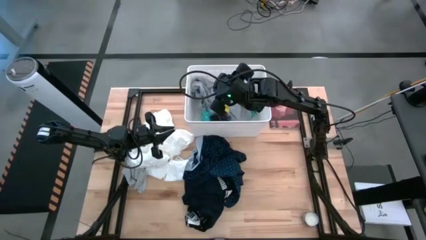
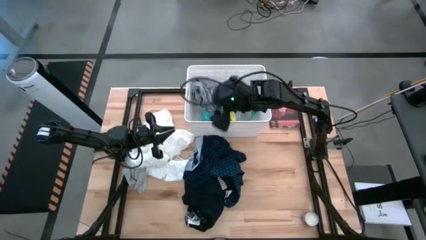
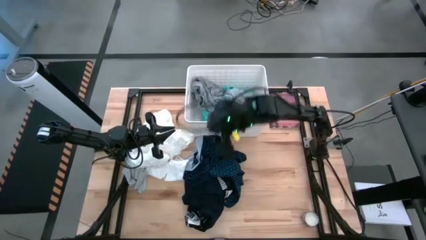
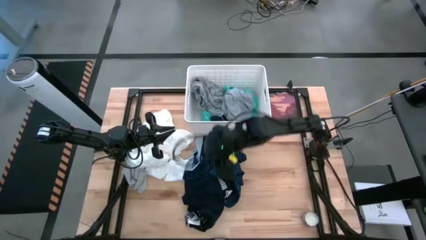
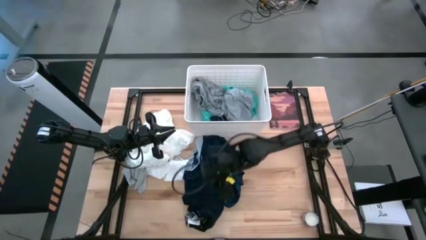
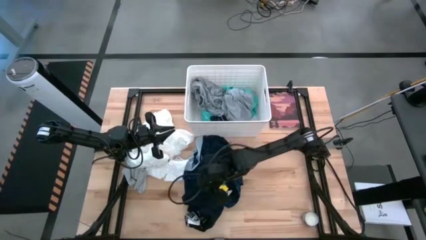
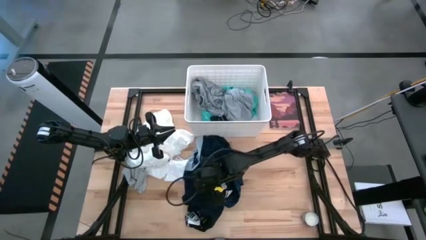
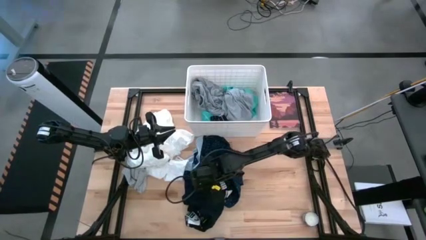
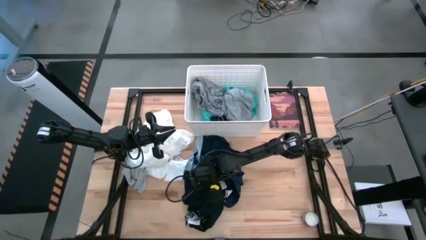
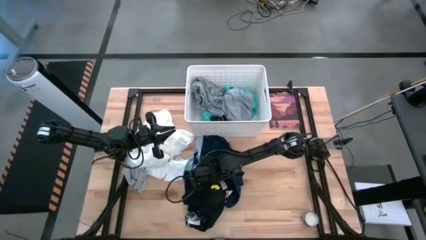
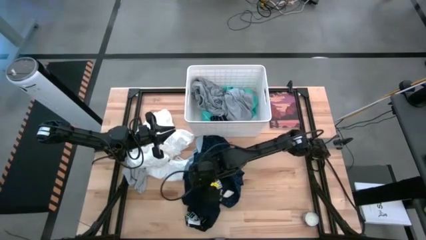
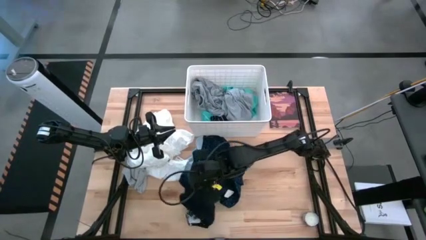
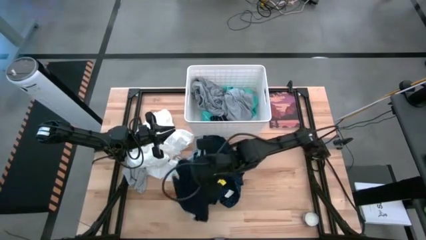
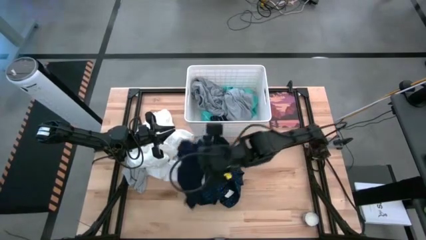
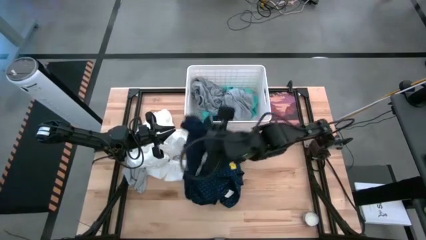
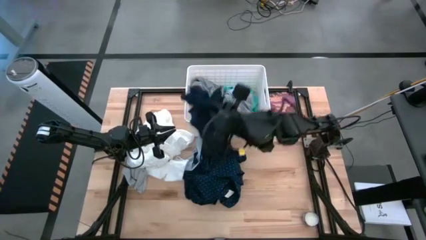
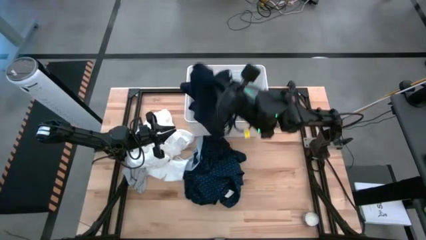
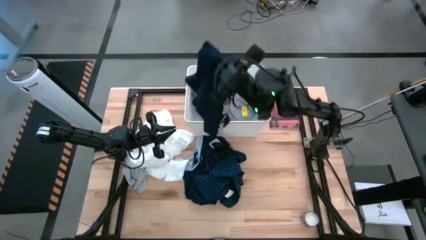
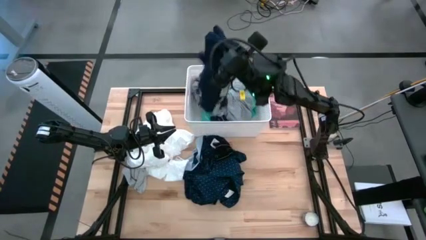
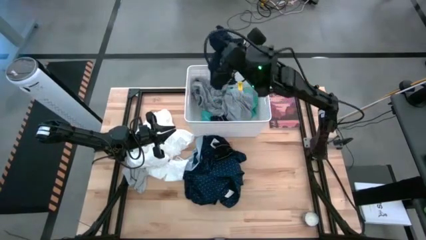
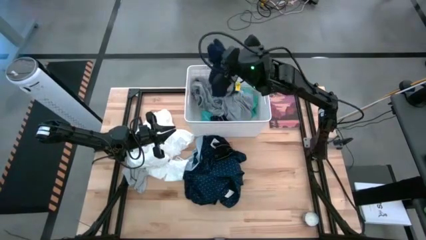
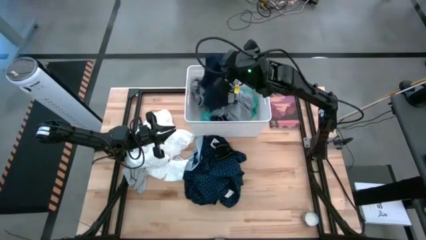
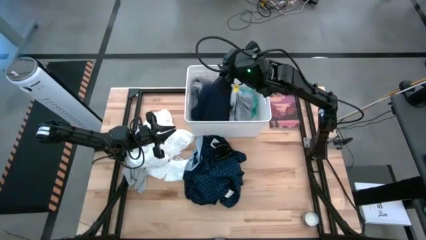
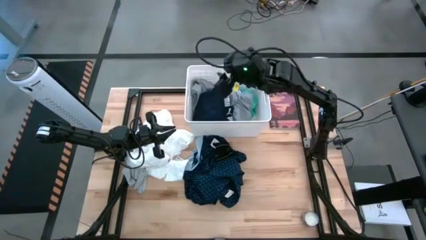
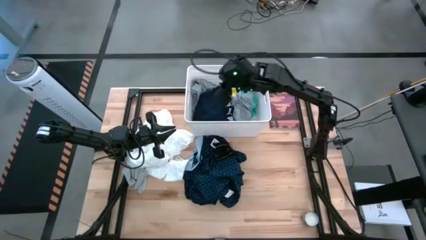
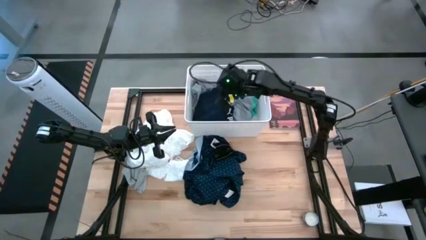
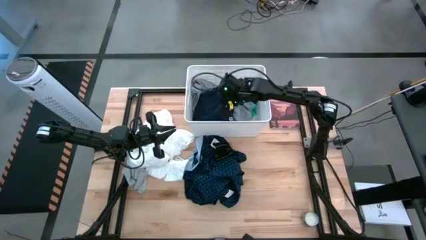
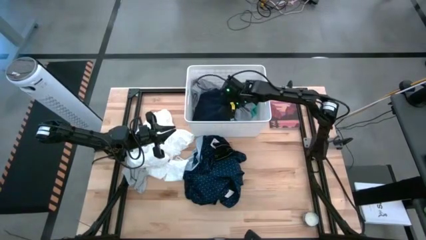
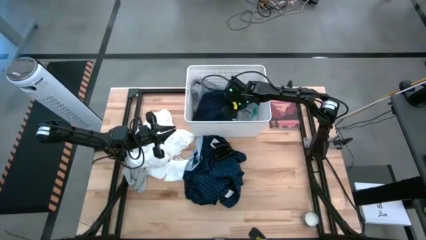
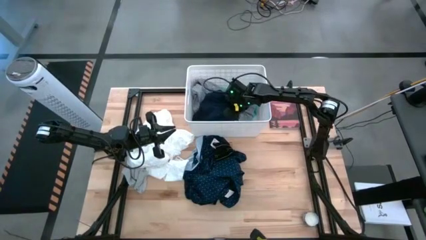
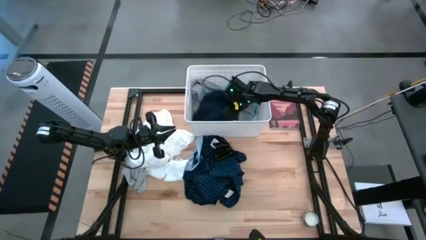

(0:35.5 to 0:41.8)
Task: Sort clothes
Put the dark blue boxer into the laundry bin

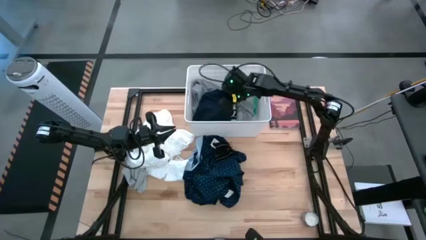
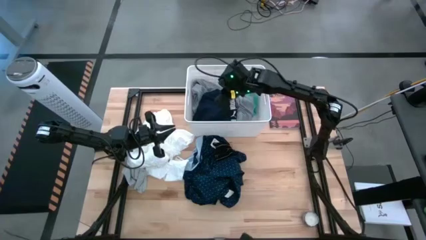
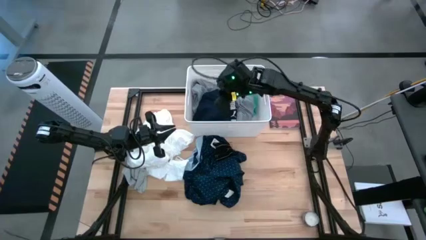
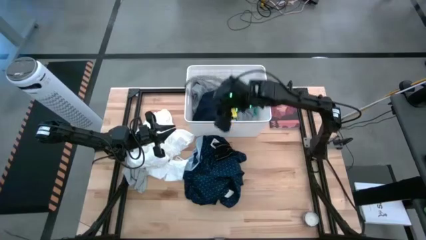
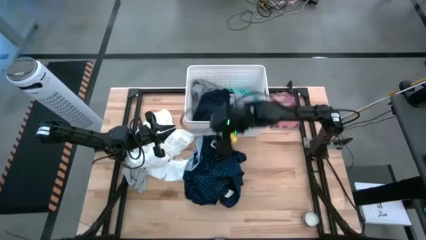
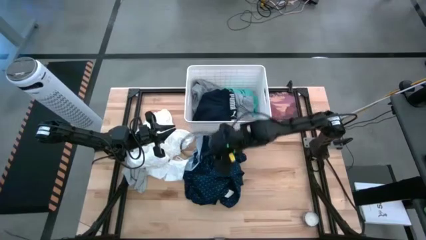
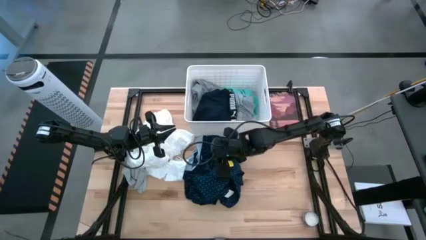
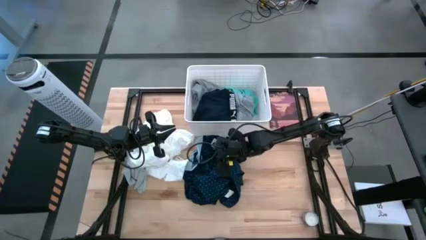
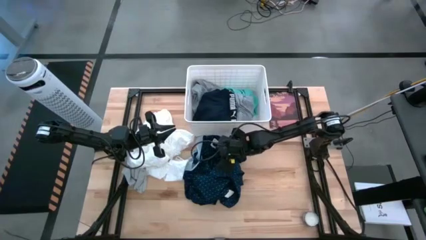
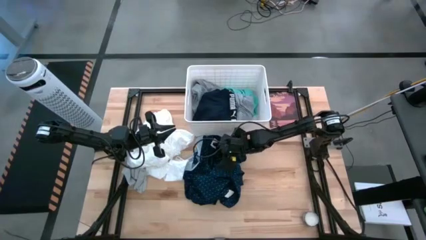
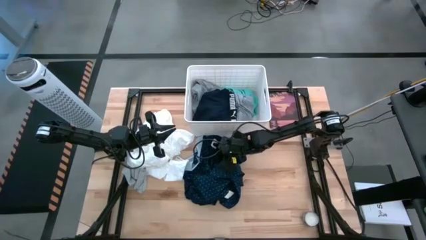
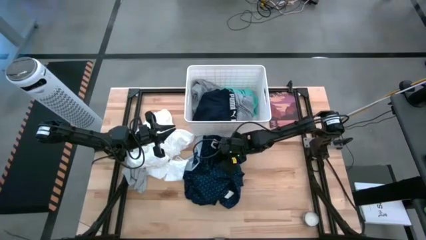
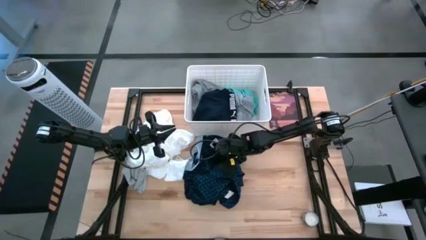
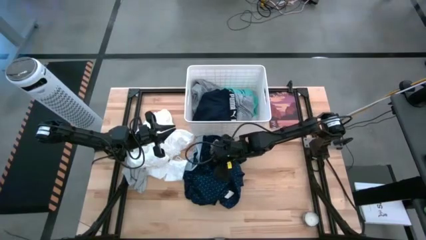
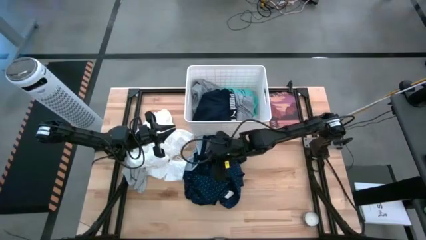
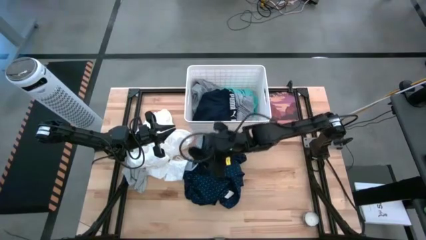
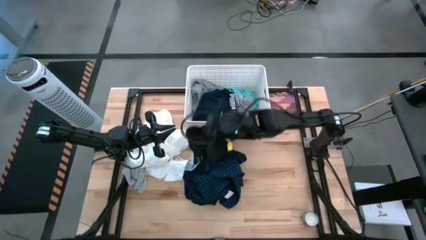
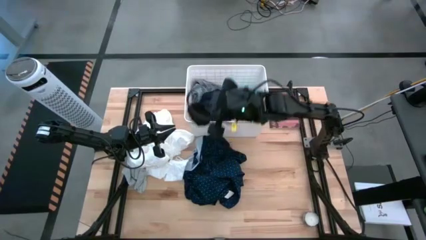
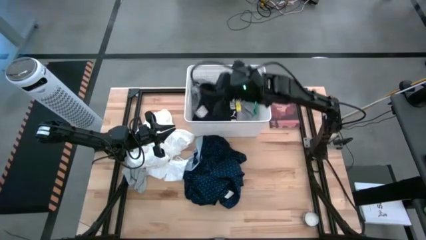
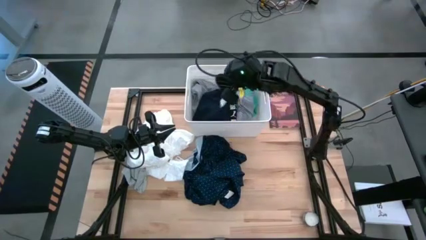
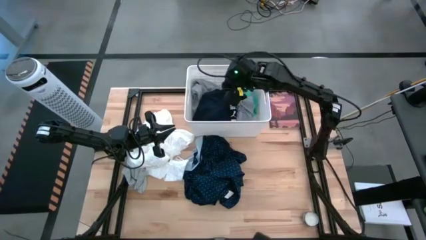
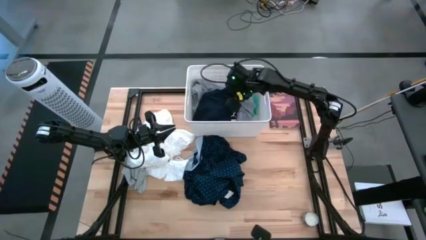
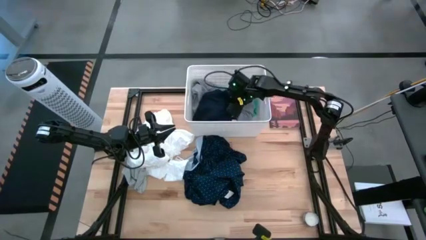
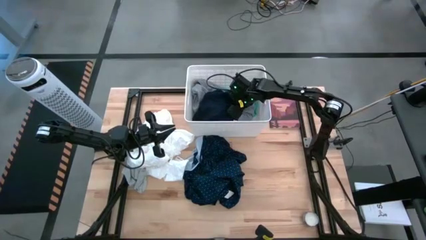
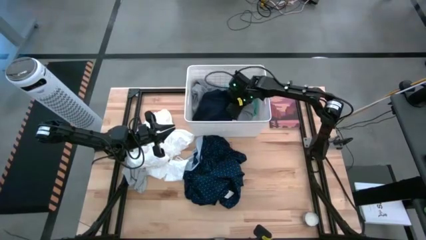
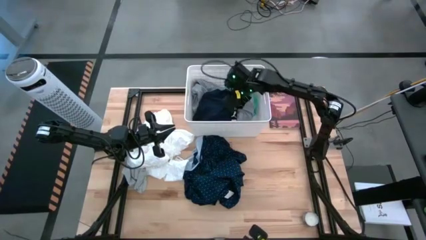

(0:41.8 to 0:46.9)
Put the black striped sock into the laundry bin
